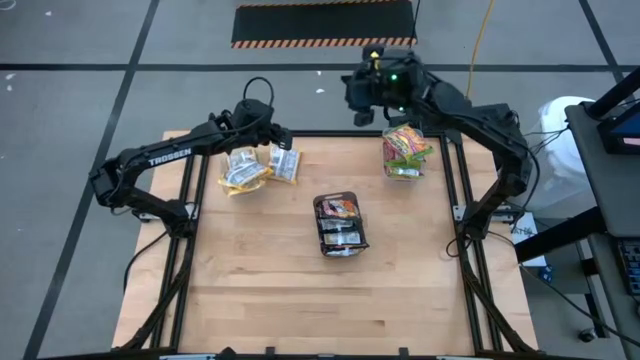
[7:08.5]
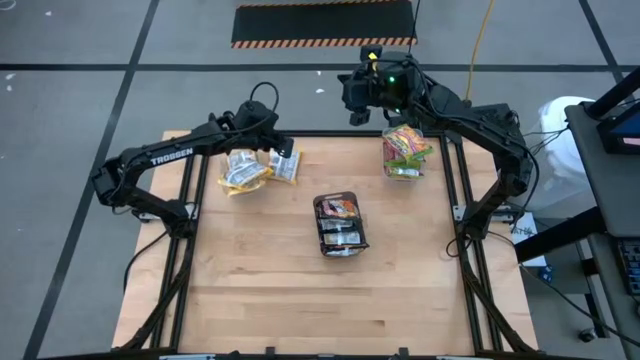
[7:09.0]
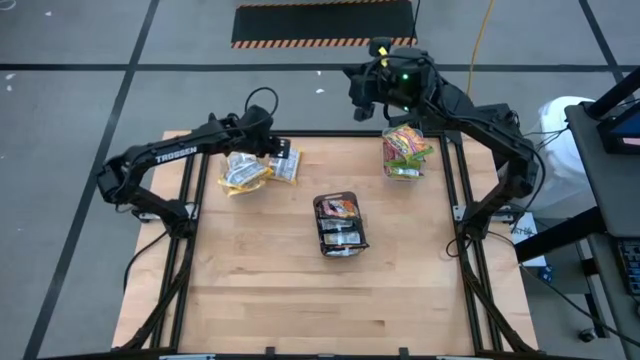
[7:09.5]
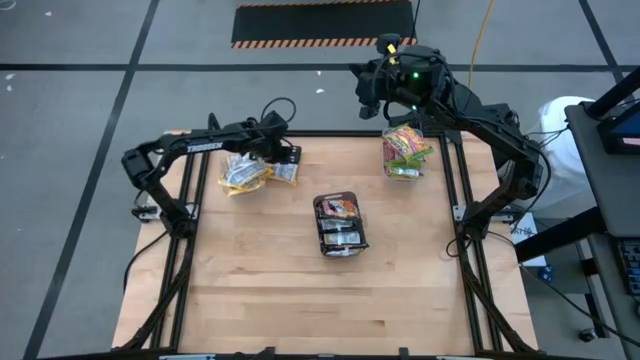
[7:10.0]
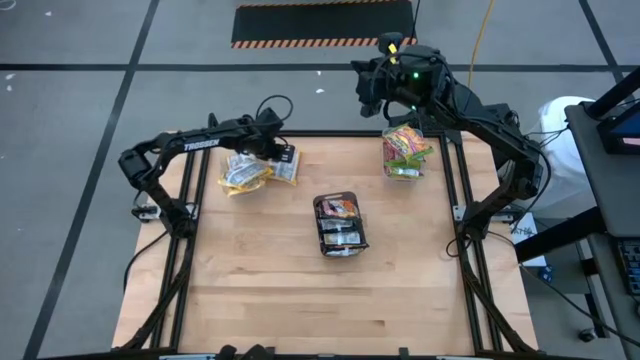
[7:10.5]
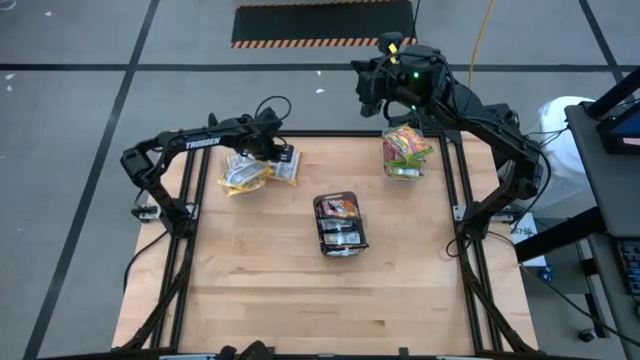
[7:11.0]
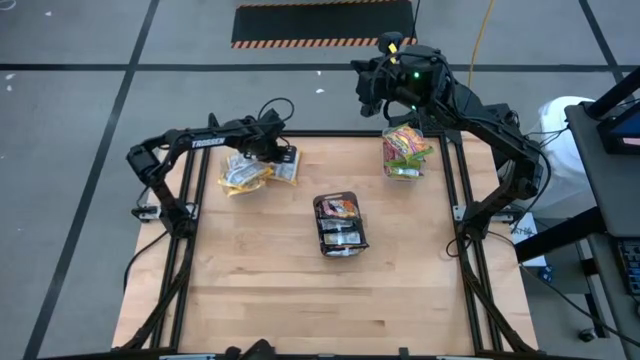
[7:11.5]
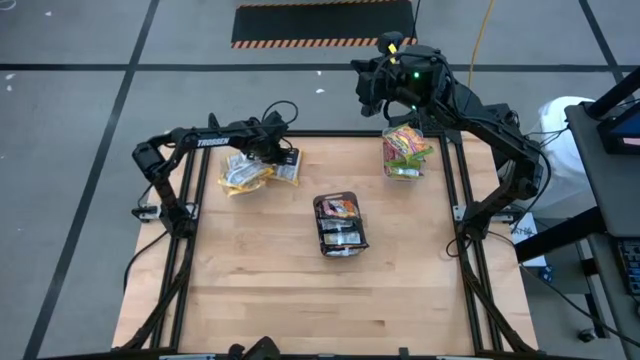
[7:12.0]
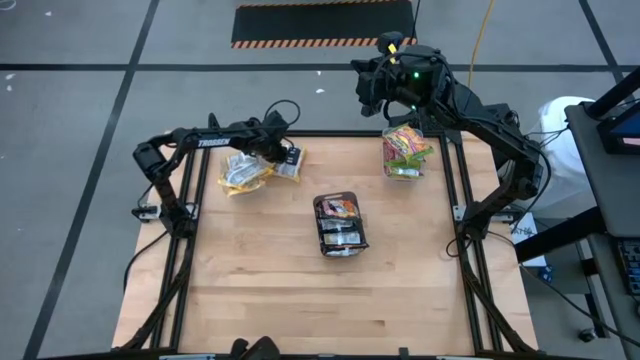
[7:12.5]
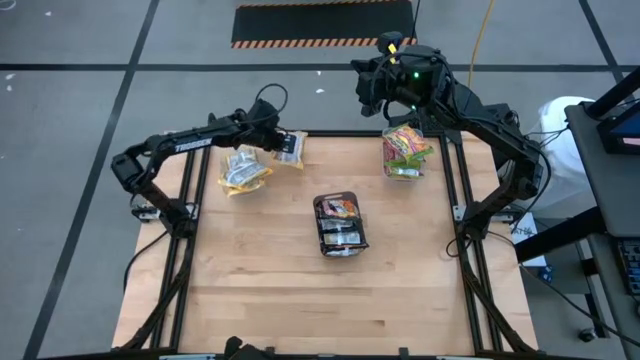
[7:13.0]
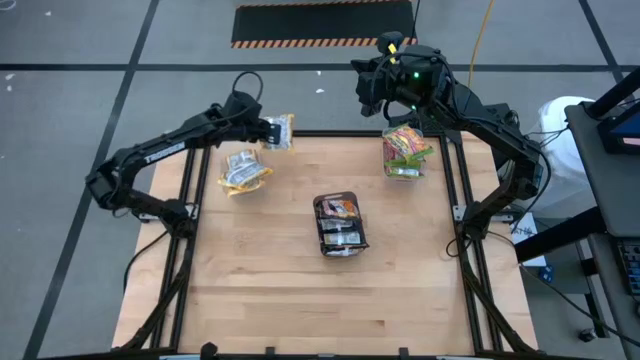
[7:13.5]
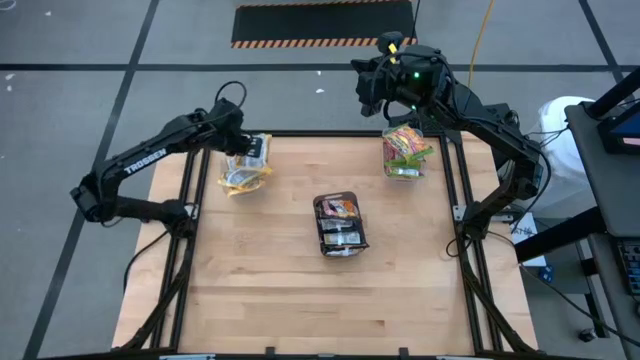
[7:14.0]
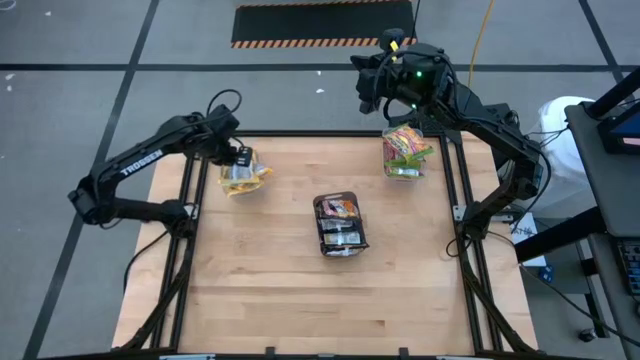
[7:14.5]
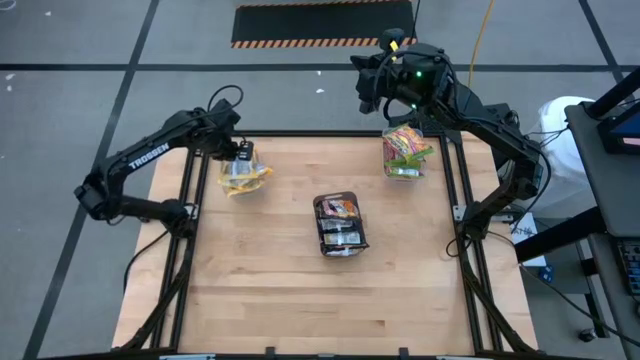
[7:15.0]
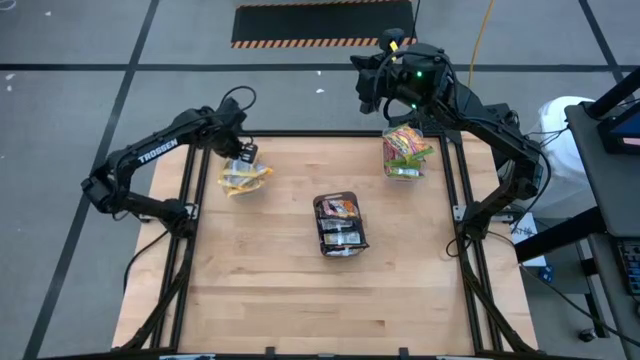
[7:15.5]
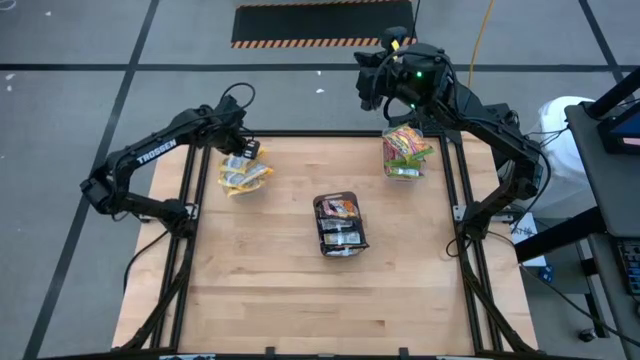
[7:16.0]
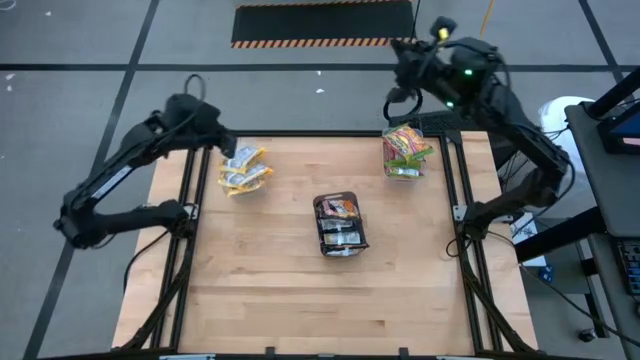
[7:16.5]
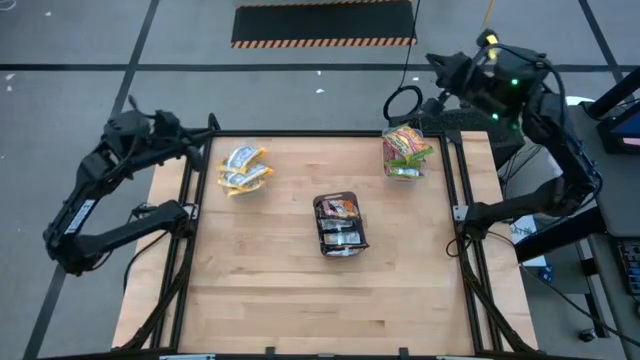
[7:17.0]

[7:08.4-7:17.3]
Task: Sort Maruchan noodles
Put the yellow noodle pack into the left transparent bin

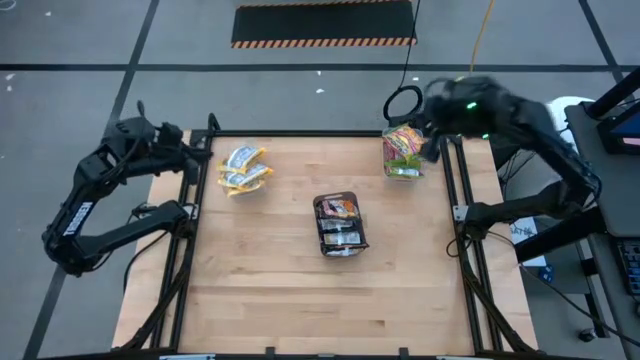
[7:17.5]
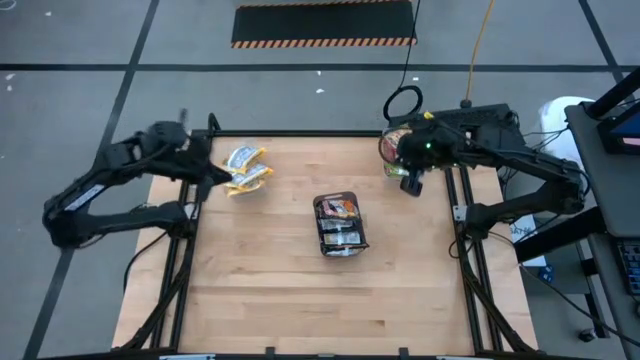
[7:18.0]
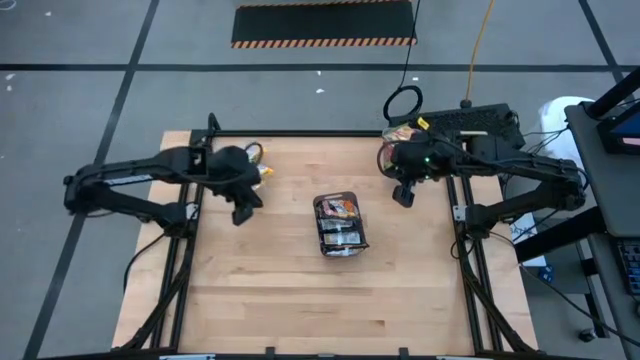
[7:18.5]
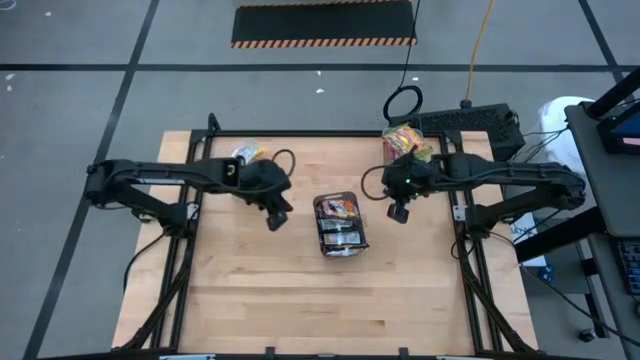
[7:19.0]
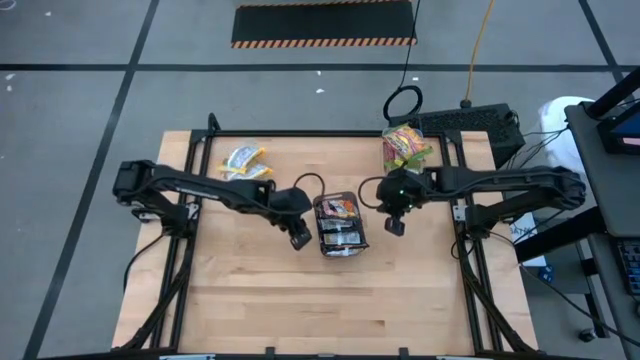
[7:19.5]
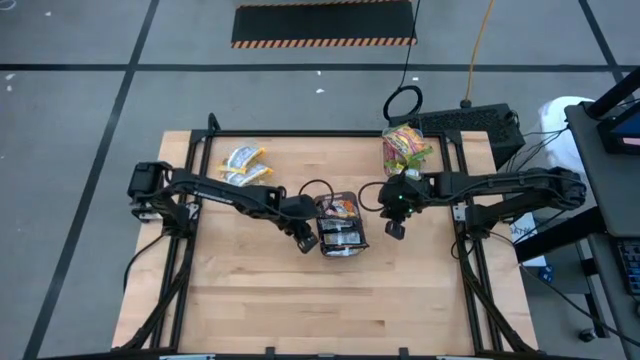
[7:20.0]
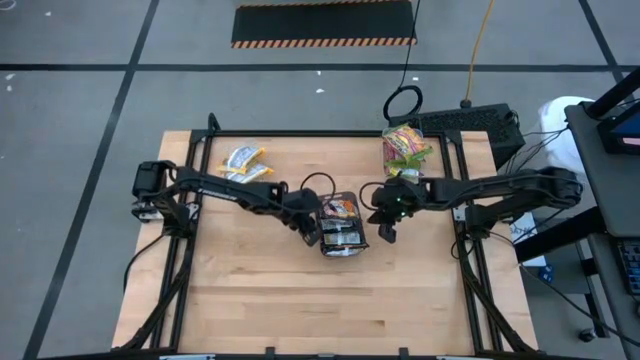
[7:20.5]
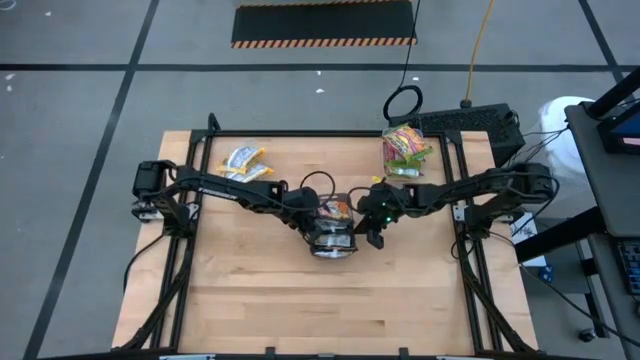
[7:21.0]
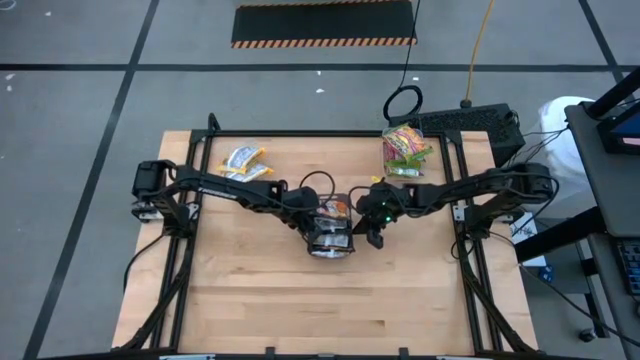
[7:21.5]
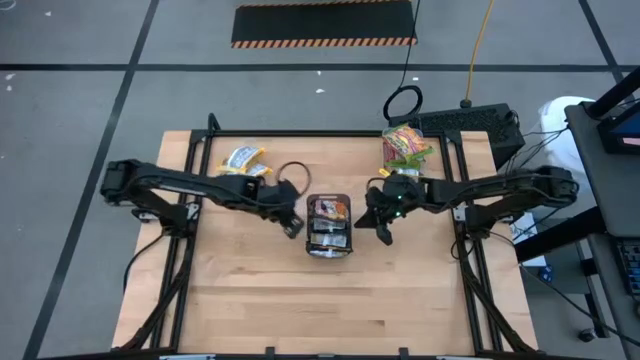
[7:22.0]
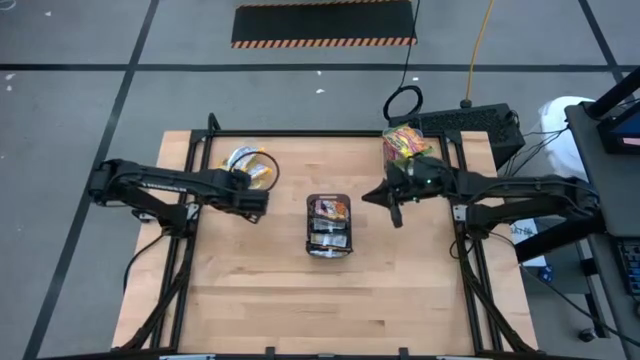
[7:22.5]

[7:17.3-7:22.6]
Adjust the black bin

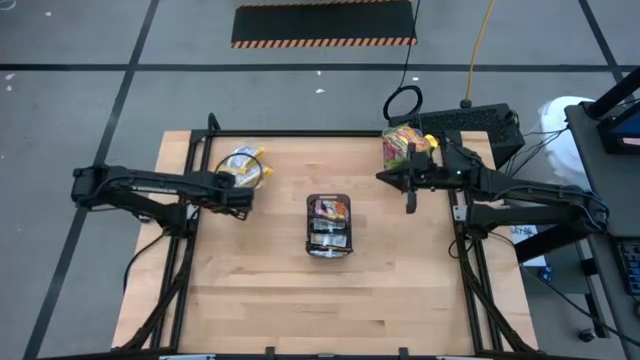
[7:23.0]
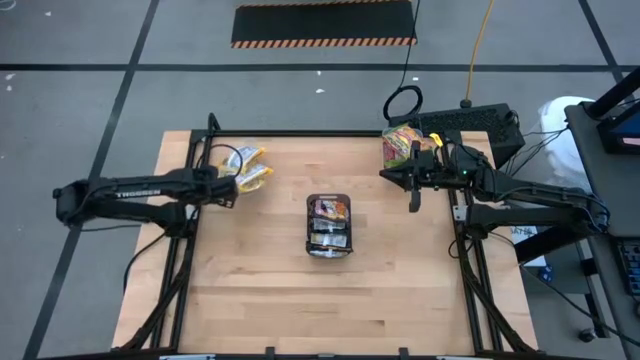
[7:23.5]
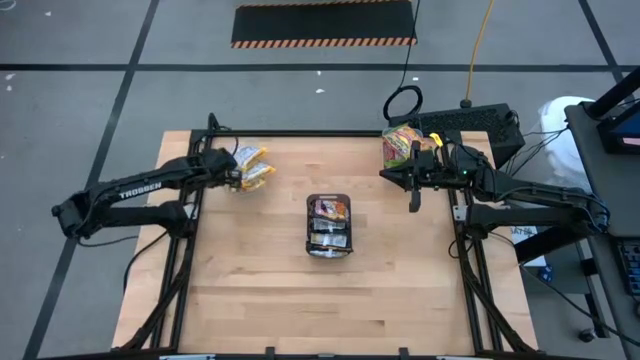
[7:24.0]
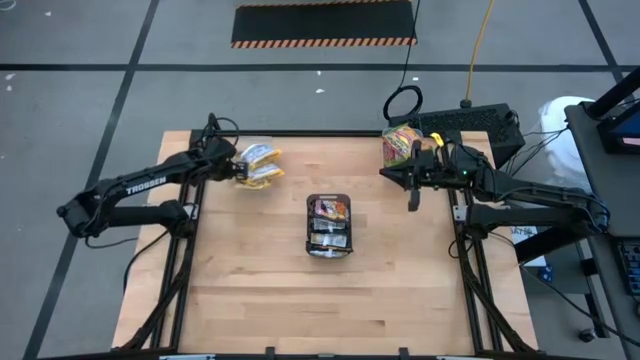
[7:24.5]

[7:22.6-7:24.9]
Adjust the right transparent bin

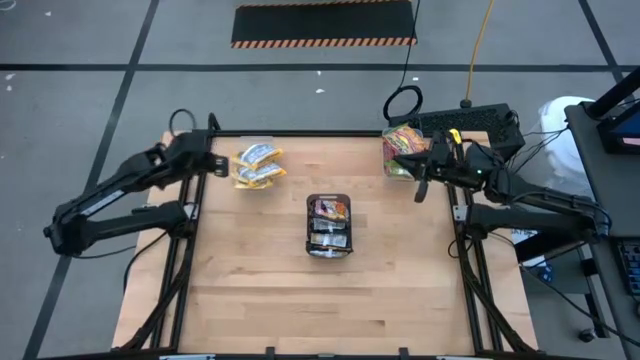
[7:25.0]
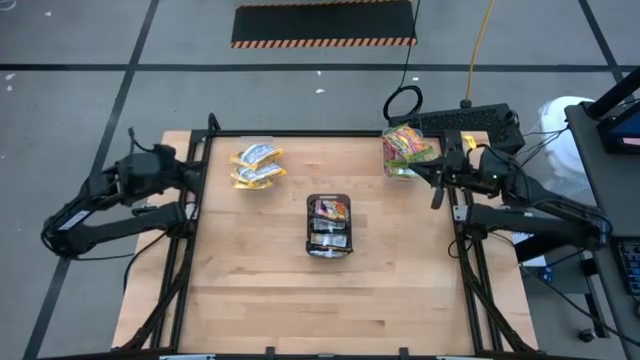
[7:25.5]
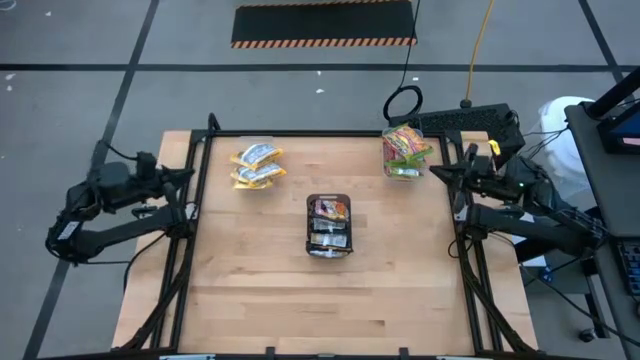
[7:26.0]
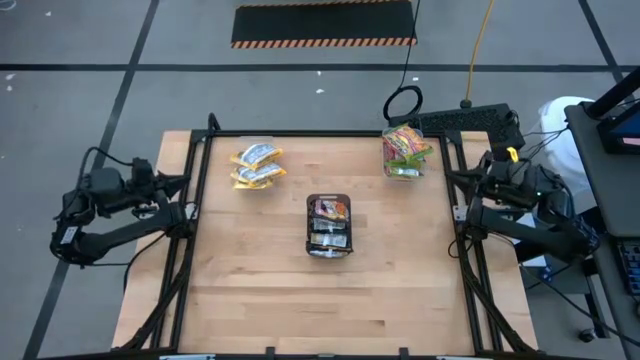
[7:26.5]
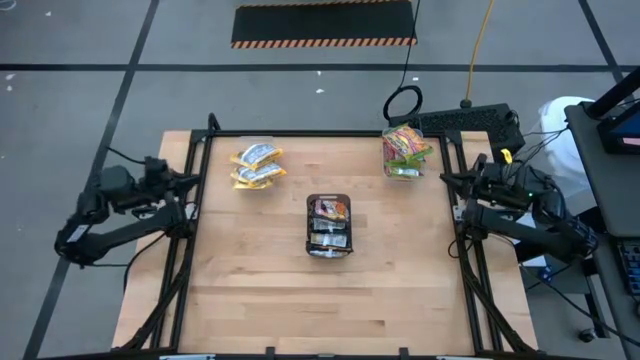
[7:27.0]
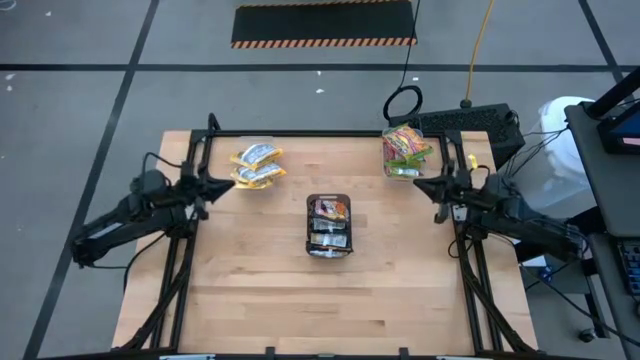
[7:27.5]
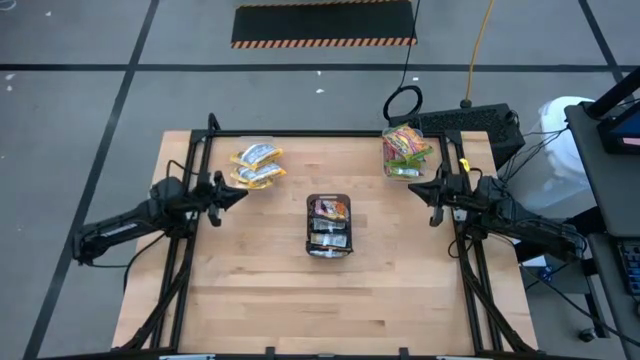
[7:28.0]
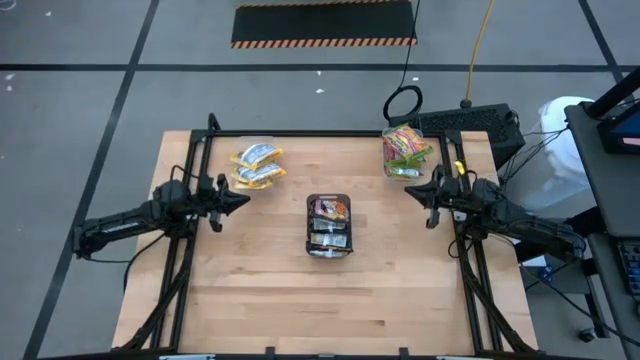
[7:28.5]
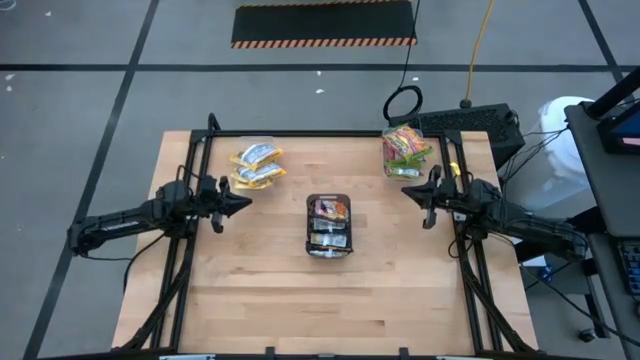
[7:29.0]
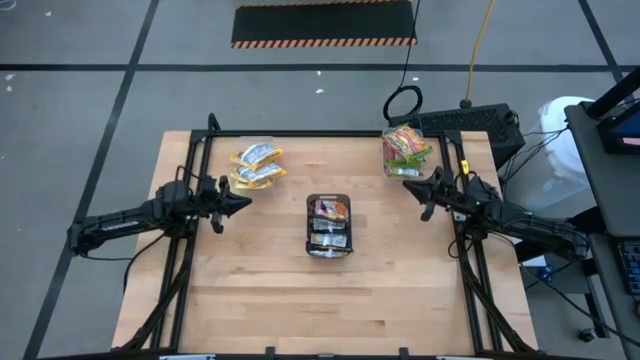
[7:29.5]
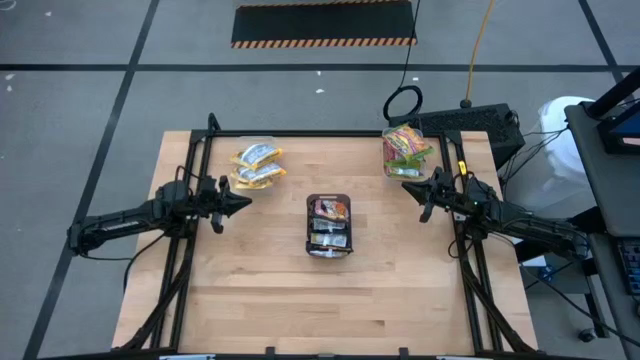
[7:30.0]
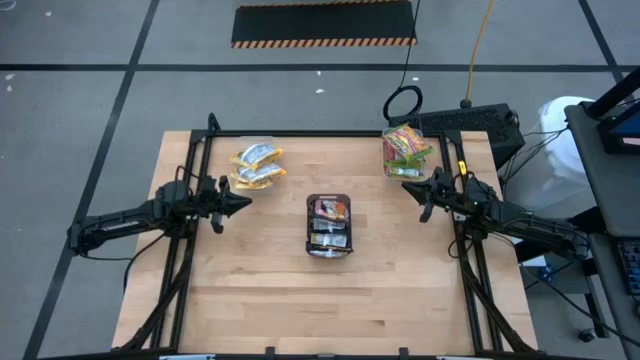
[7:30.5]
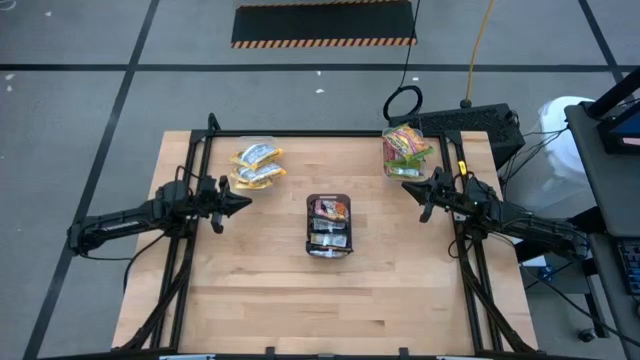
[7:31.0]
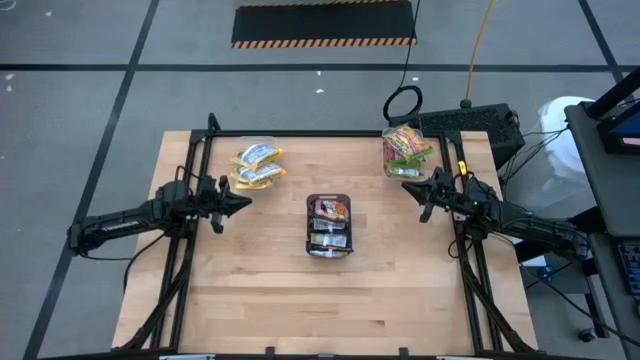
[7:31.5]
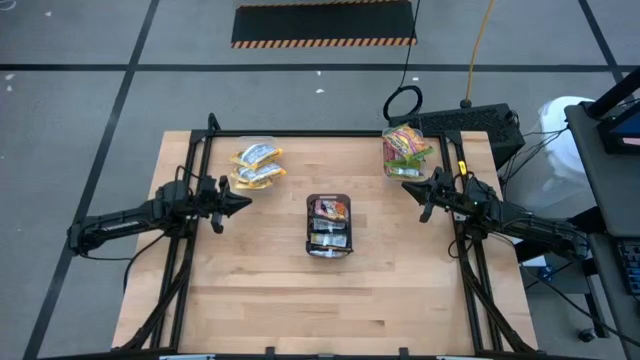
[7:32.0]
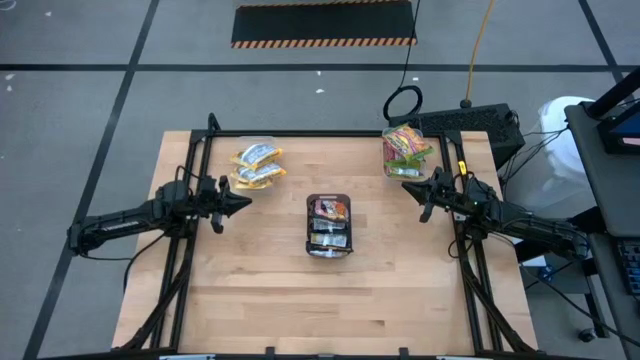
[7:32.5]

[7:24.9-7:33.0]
Return to Home Position
